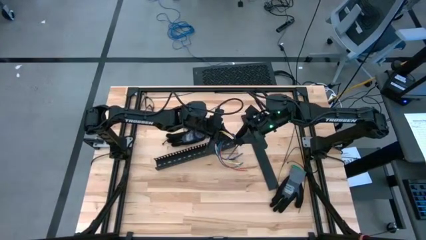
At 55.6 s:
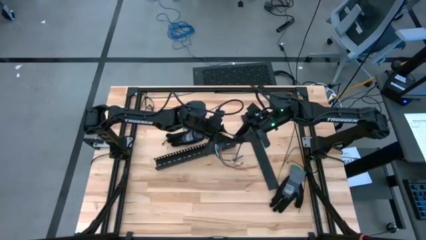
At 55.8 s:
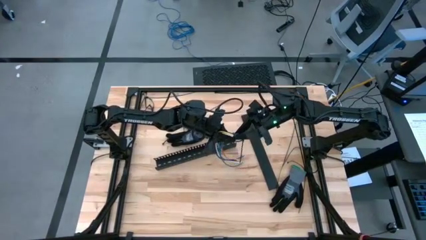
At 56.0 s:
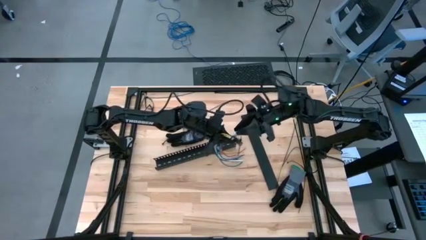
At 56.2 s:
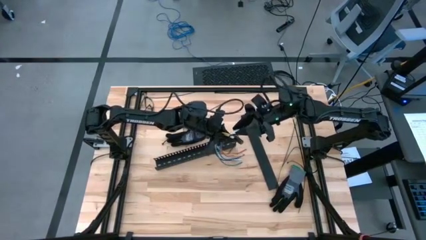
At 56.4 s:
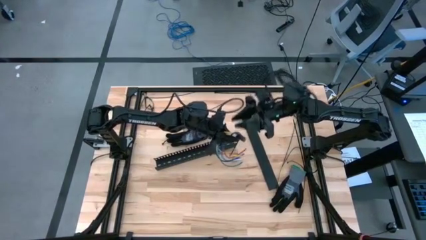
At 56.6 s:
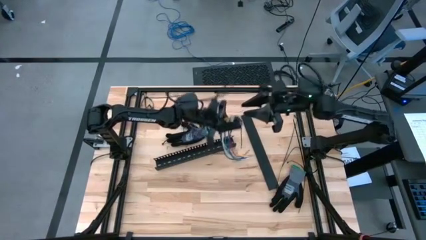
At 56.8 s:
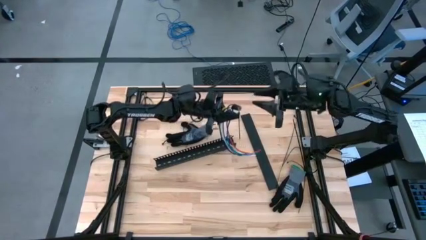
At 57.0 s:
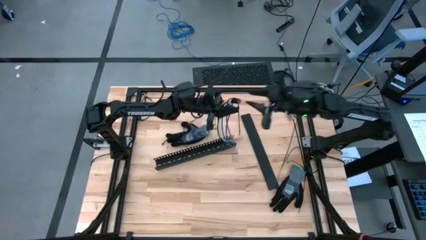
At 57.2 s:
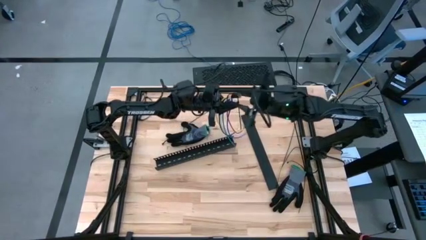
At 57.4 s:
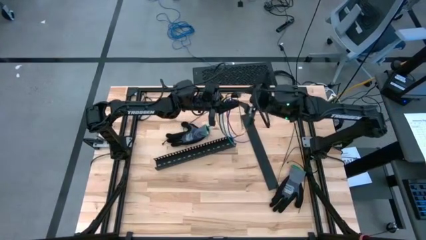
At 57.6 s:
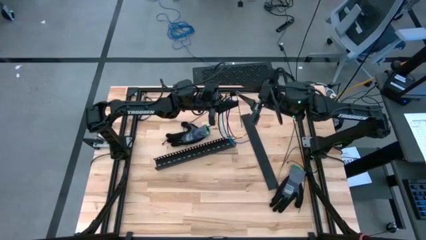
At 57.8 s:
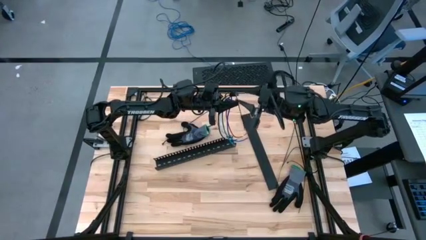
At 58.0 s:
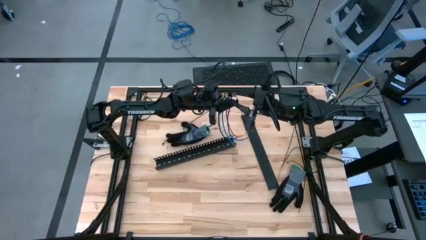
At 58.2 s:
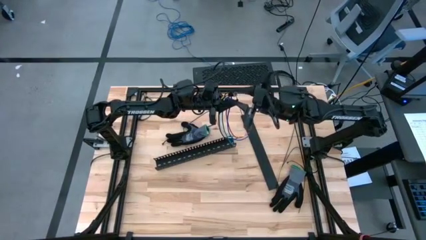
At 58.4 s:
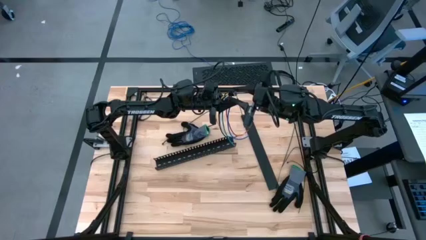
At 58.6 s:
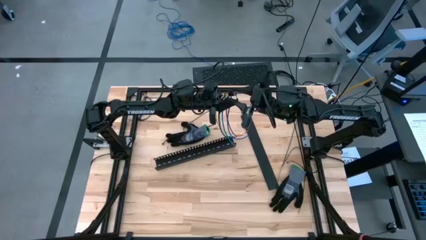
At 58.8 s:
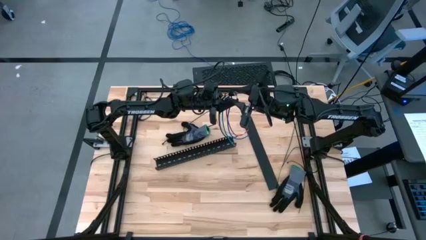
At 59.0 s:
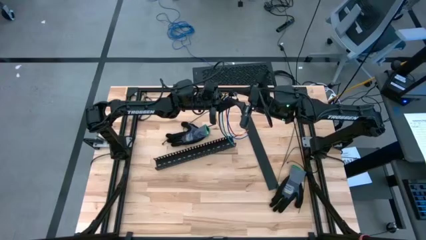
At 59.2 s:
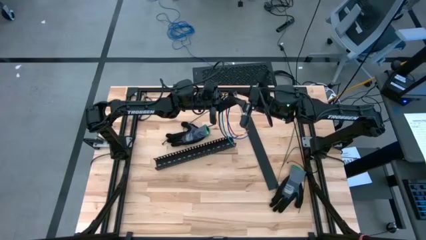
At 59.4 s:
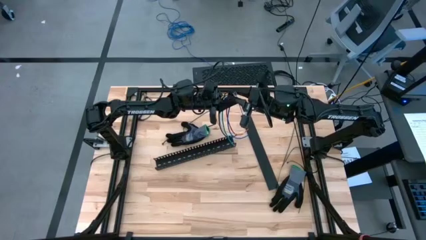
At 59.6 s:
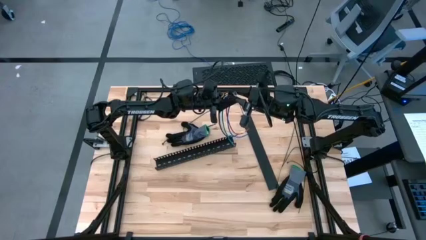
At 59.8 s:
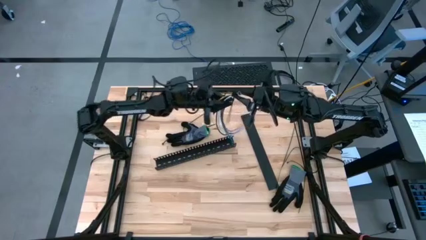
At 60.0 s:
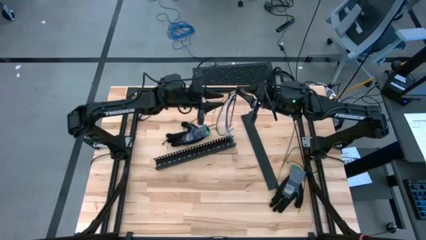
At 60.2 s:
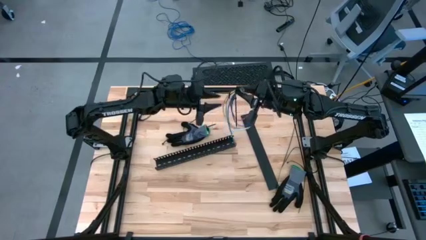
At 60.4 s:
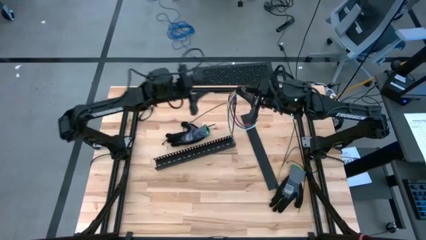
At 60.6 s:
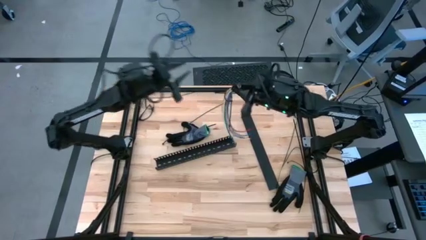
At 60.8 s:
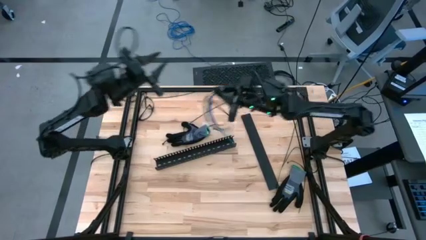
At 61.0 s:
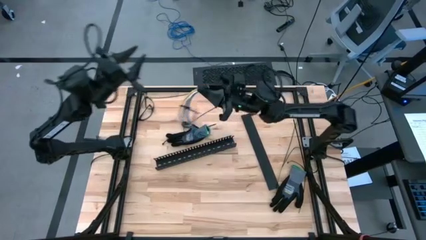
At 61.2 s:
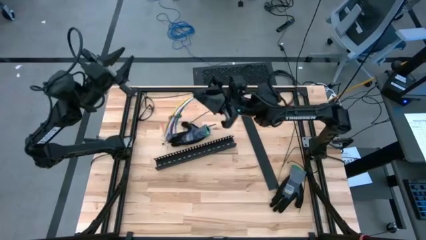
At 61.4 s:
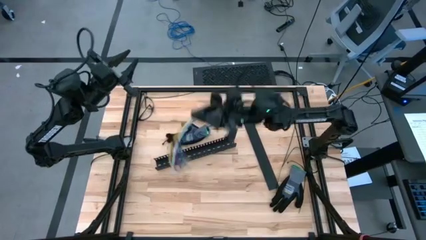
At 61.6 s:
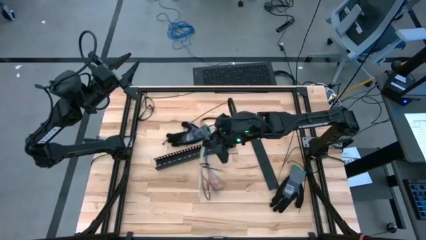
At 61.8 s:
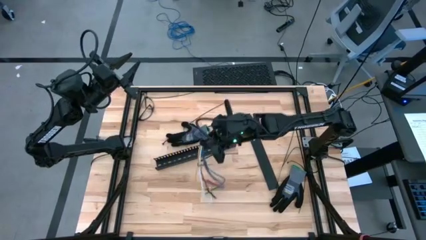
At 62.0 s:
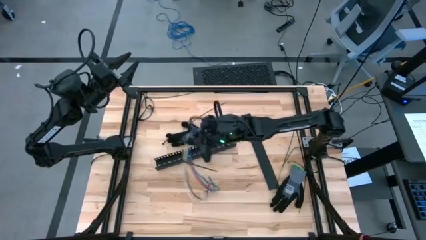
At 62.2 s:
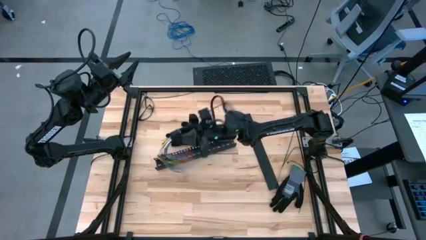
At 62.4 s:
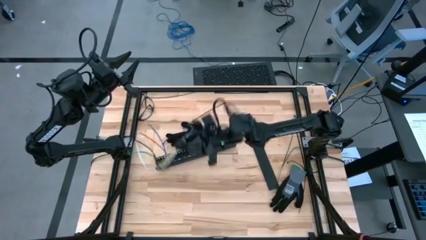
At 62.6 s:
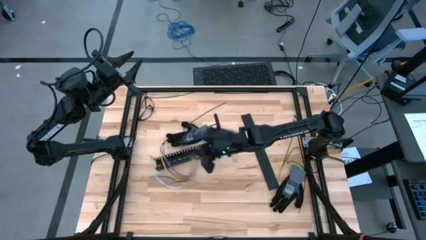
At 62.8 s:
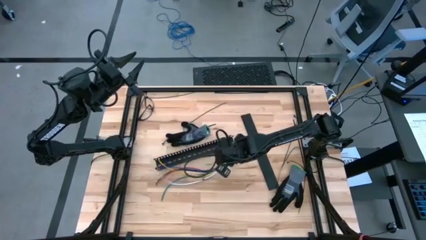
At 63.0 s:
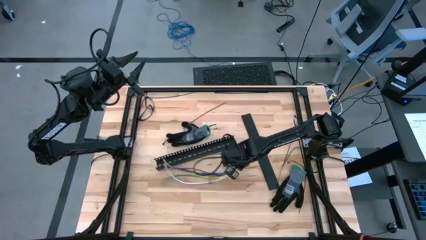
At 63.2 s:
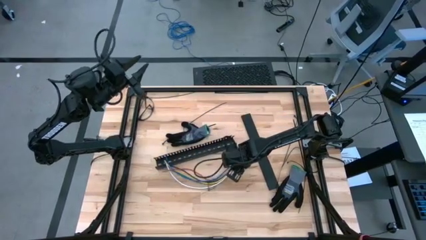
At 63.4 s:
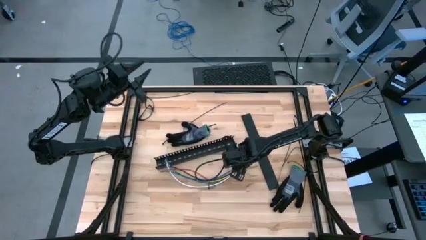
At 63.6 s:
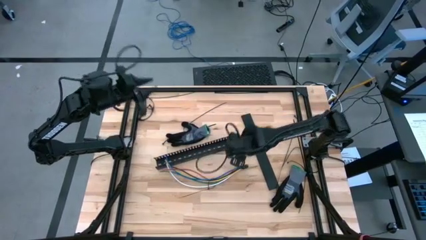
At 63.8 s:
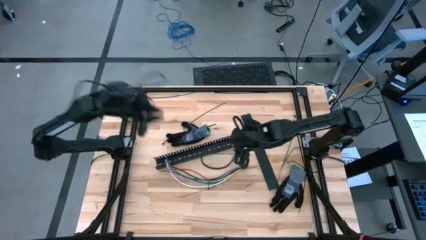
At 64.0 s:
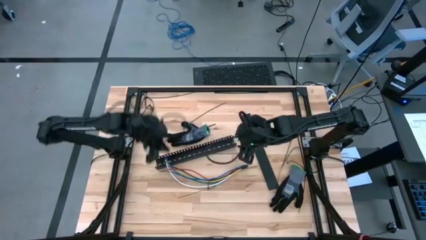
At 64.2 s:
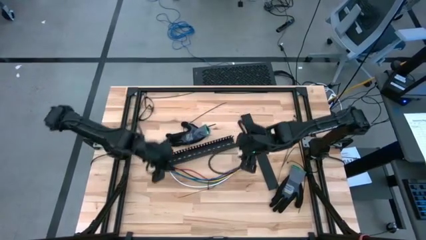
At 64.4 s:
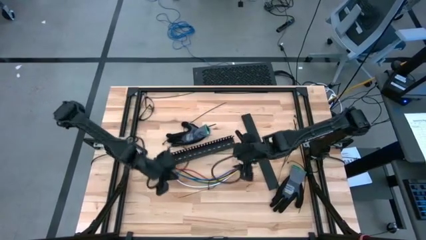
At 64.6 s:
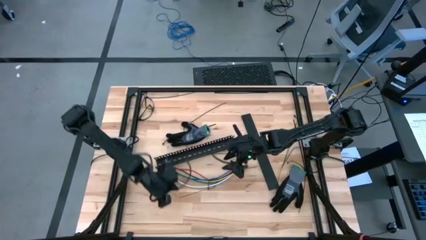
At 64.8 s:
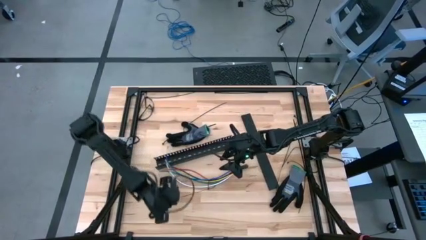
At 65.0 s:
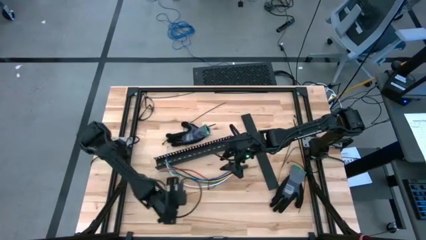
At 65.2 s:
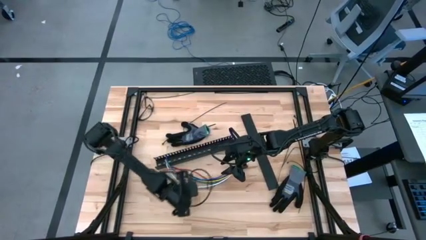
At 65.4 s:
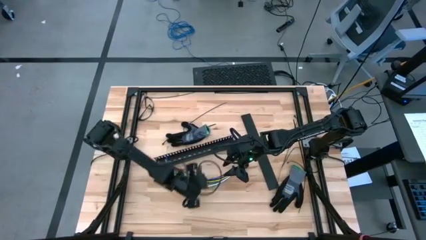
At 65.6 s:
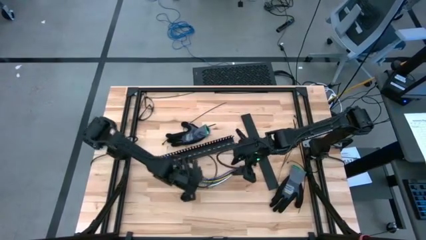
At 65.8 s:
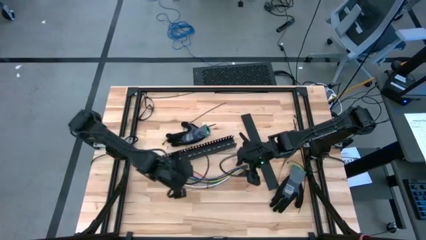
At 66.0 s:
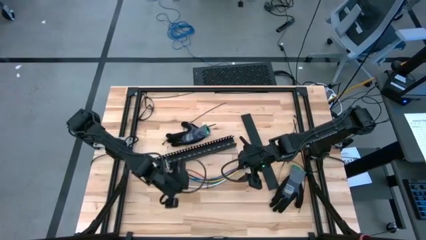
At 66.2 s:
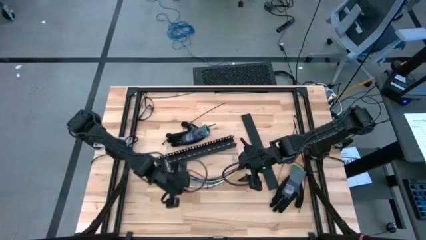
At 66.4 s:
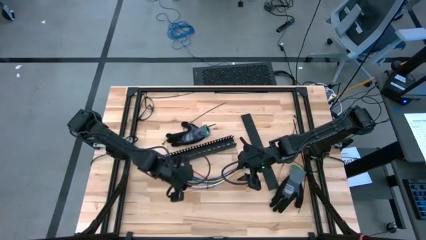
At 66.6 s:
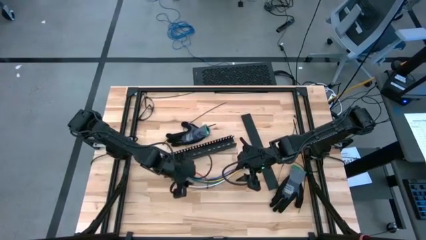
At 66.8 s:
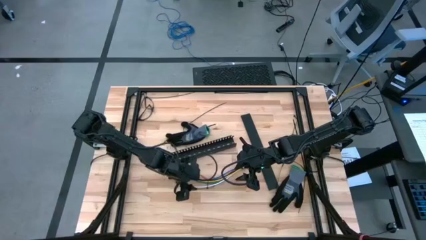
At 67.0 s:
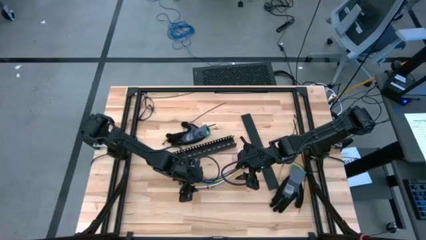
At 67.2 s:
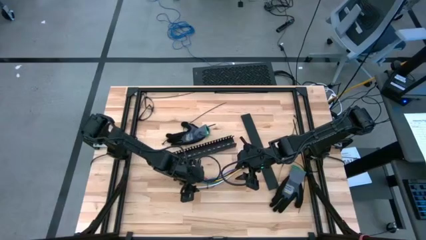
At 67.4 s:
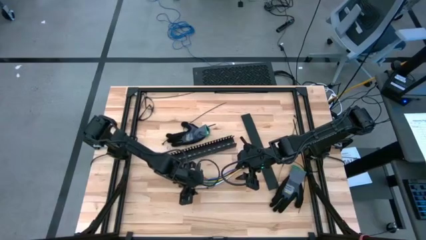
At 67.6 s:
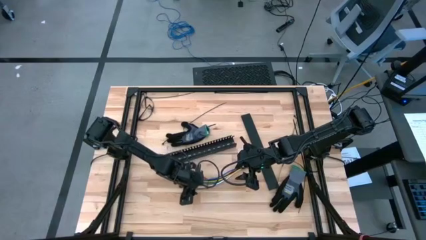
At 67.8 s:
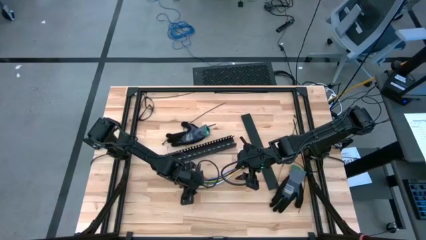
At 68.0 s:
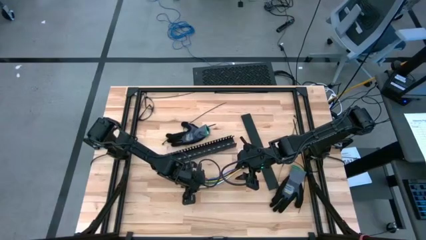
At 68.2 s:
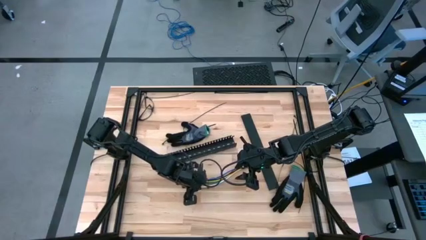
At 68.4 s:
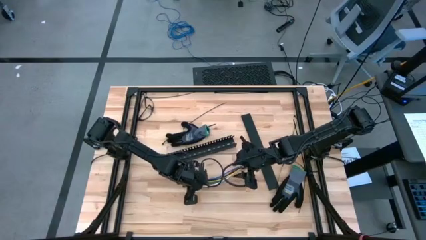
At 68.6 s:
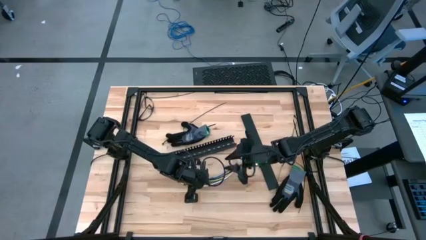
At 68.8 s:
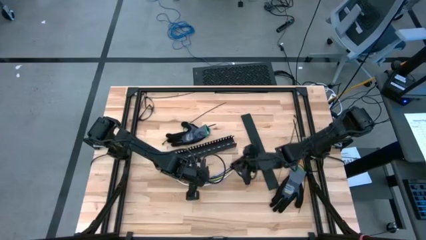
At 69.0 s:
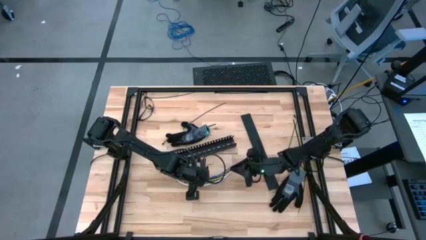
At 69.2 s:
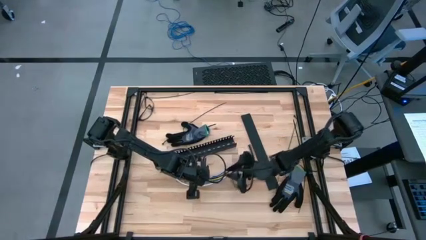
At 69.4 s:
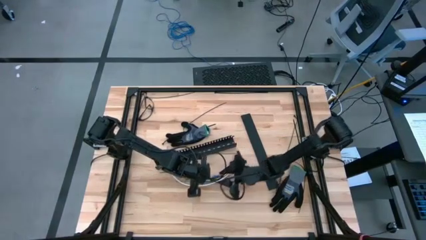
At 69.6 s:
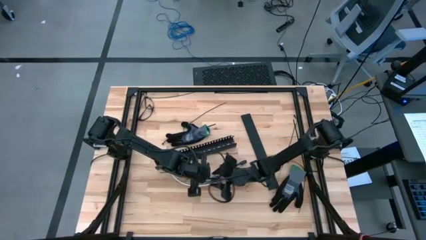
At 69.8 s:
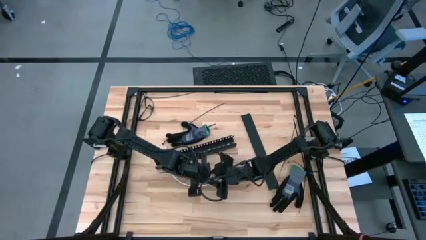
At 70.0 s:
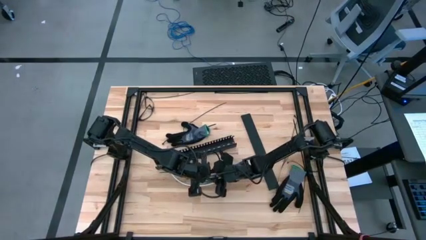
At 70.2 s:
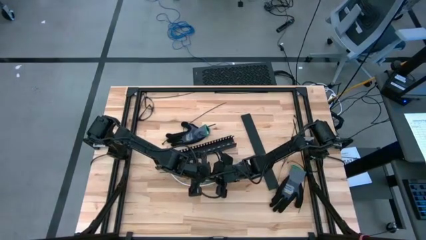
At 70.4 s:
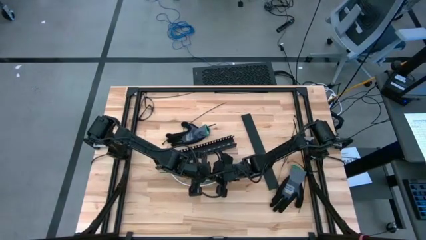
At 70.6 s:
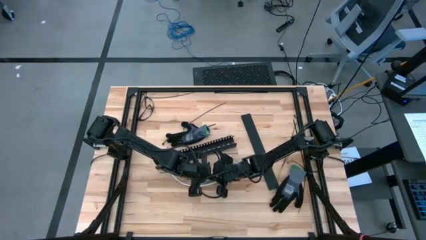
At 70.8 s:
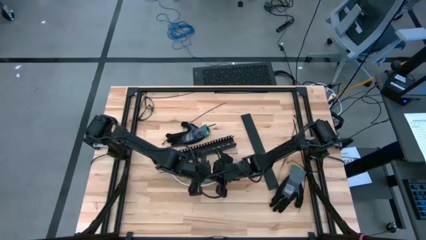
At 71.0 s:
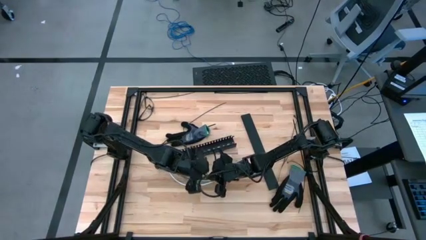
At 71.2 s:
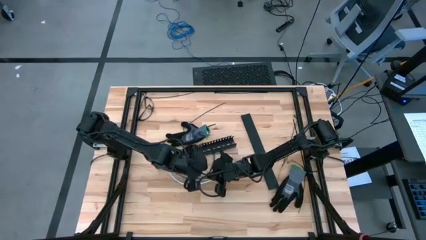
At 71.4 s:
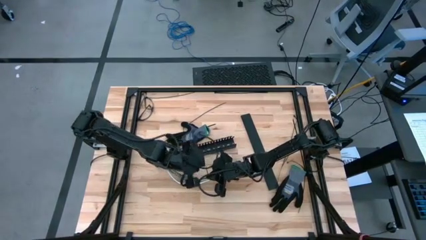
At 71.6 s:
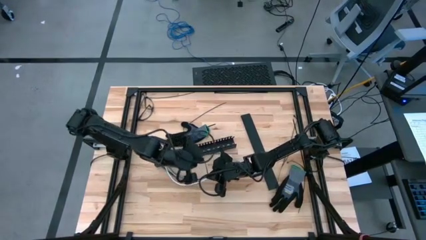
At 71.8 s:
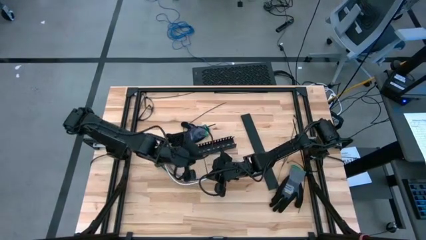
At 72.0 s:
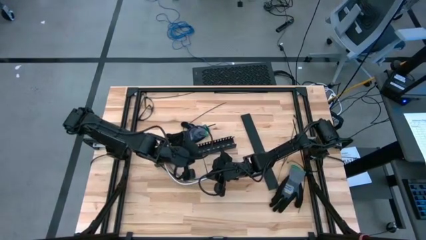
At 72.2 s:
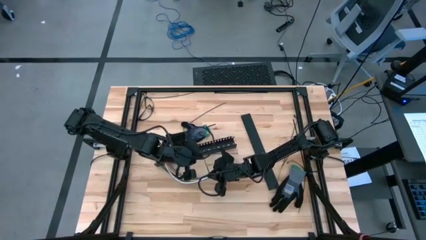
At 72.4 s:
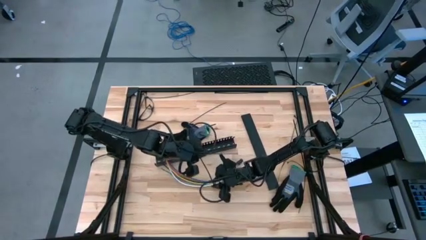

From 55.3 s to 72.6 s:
Task: Ziptie cables
Wrap the cable wires with black zip tie
